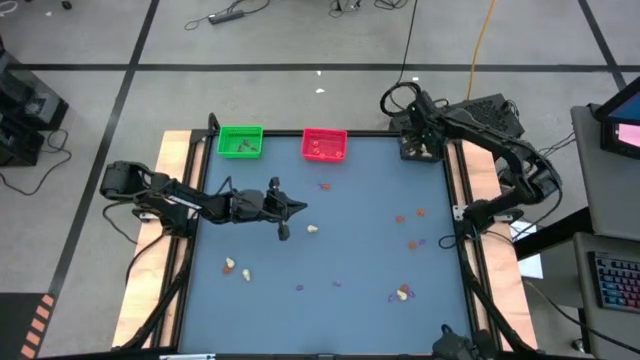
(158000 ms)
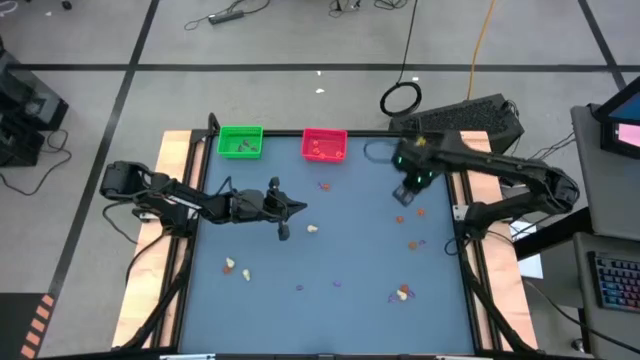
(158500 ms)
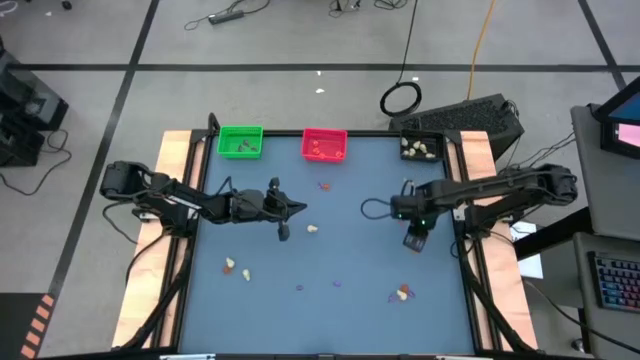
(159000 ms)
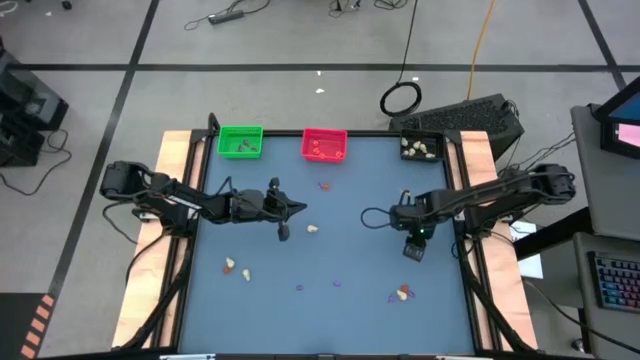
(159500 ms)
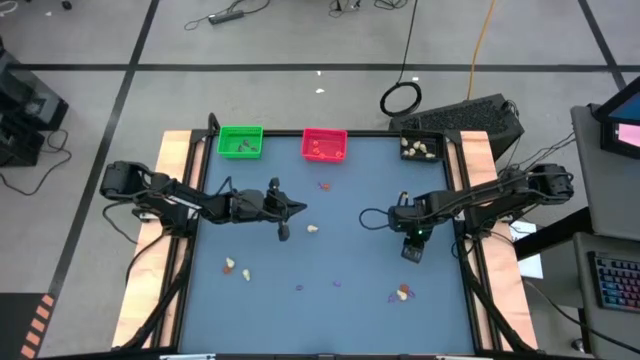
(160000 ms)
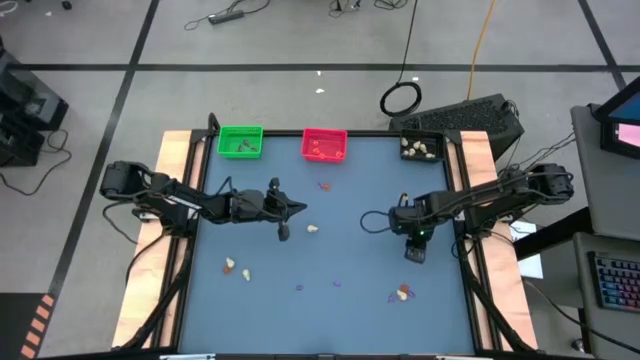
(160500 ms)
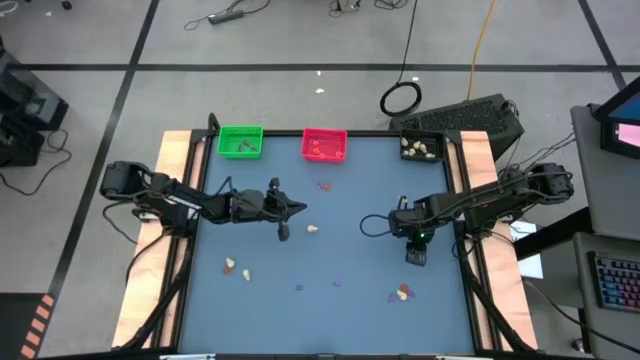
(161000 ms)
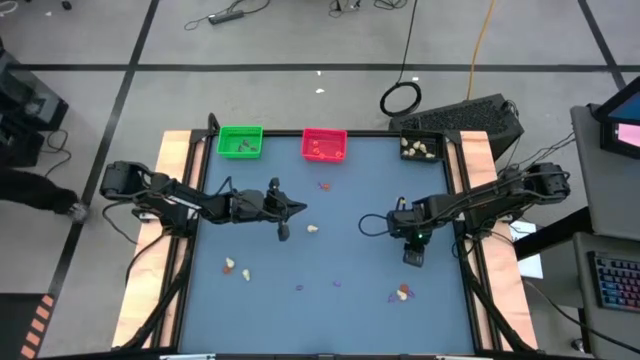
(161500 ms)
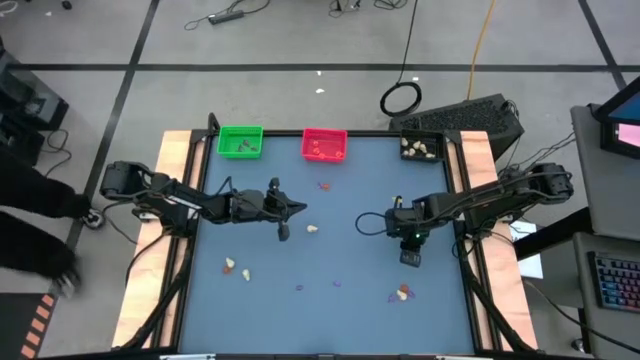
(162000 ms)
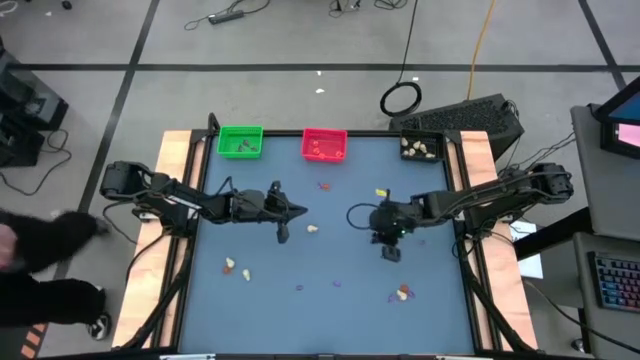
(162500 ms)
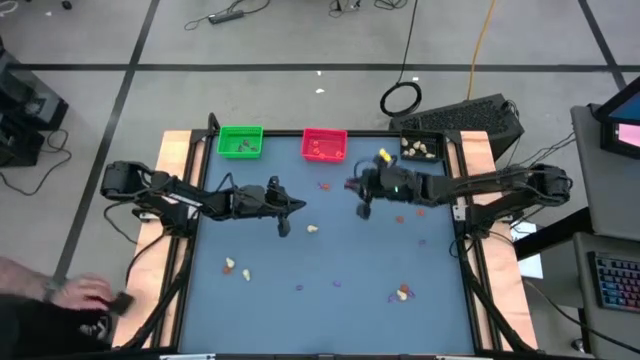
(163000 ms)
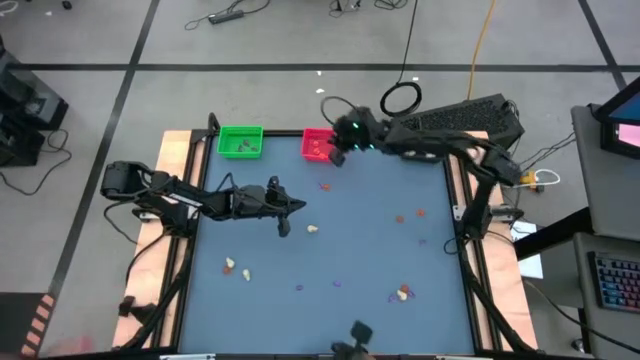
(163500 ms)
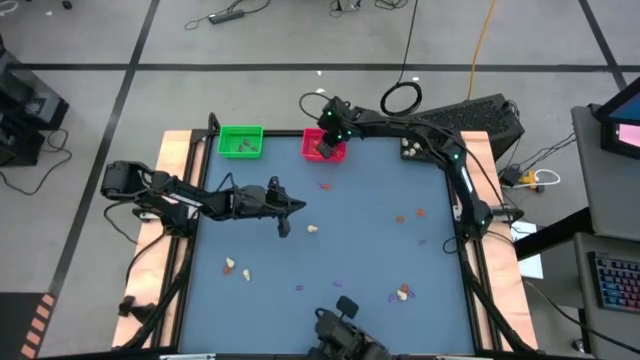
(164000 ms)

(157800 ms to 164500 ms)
Task: Sort Halloween decoration
Put the orange pumpkin toy into the red bin

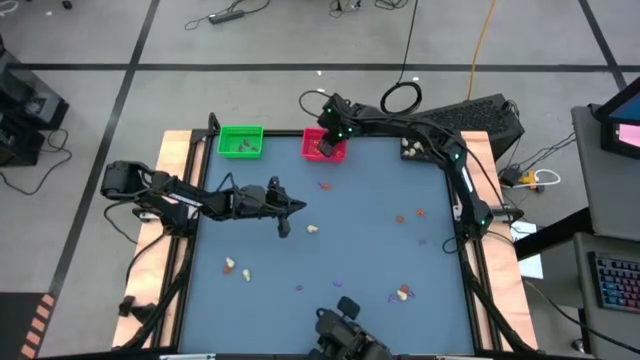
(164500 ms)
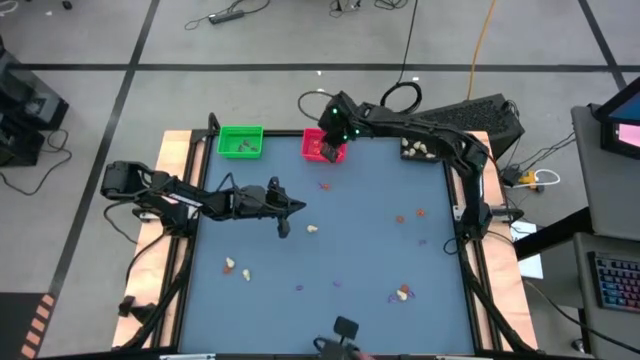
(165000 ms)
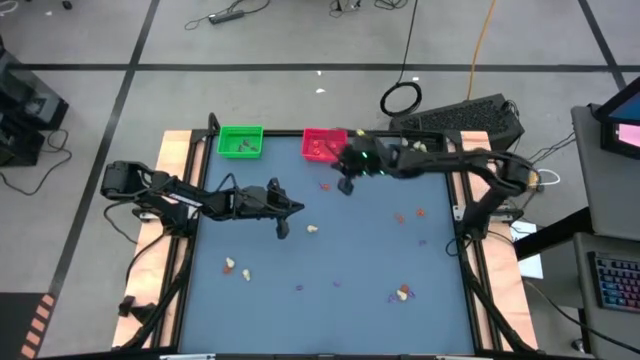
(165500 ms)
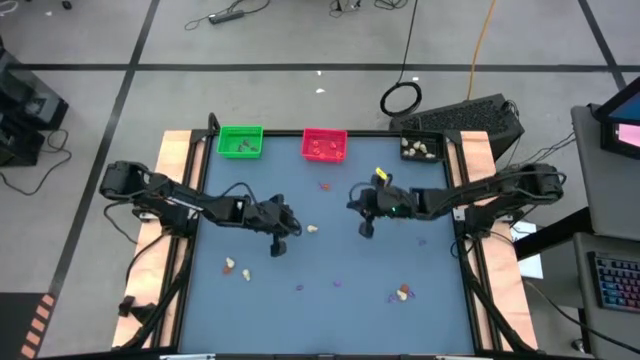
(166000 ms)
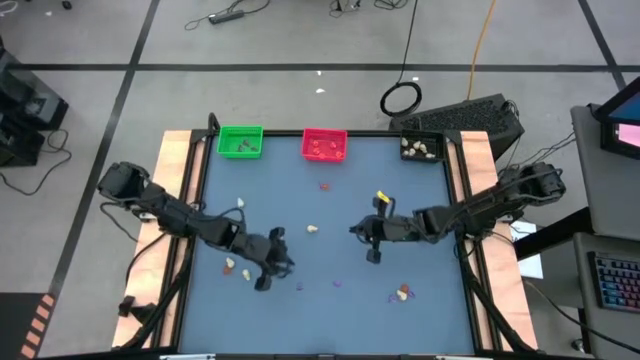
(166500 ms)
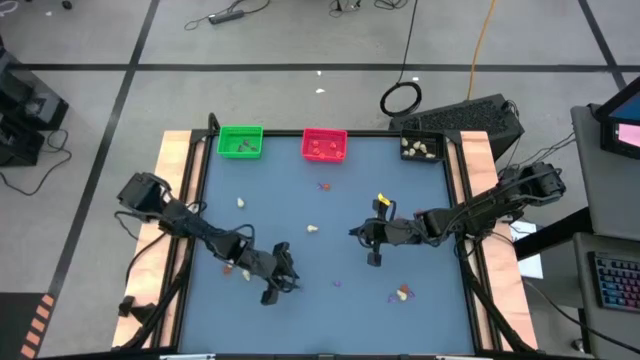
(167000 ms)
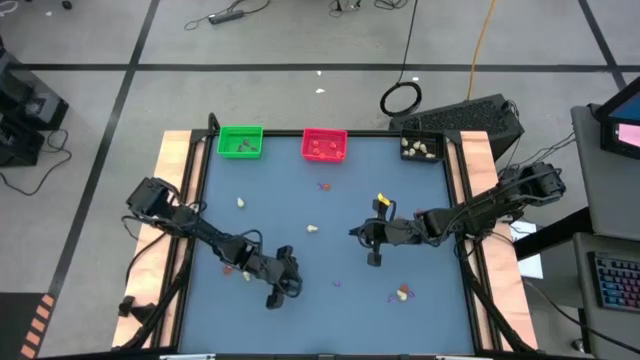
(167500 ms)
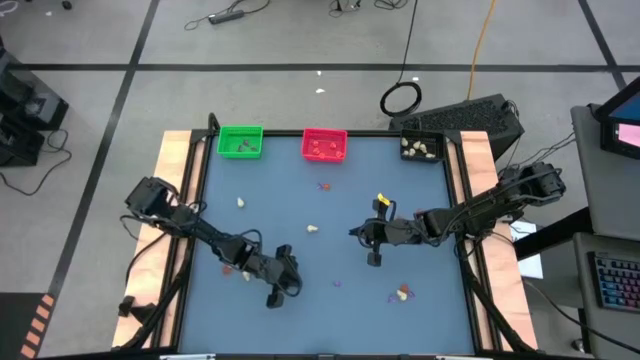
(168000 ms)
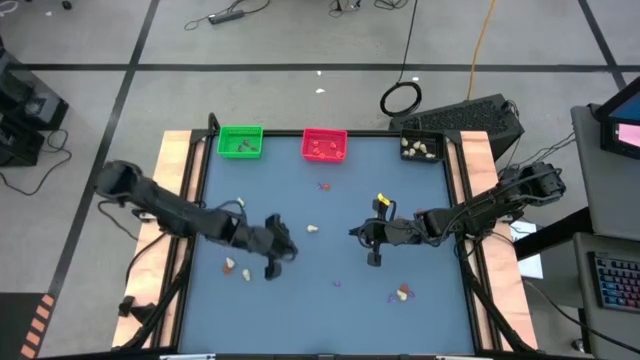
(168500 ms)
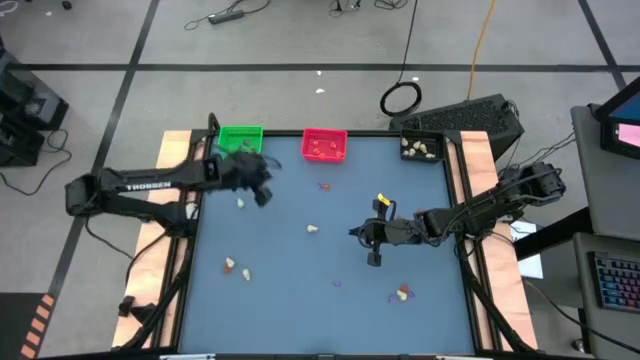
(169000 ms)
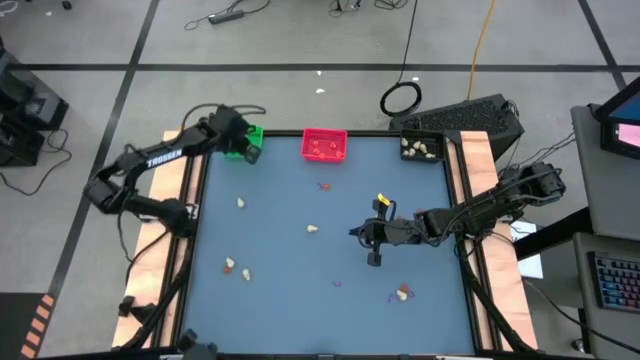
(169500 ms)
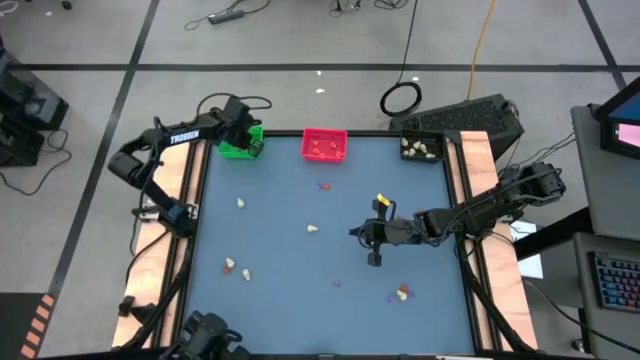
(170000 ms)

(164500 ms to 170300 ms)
Put the purple witch hat toy into the green bin

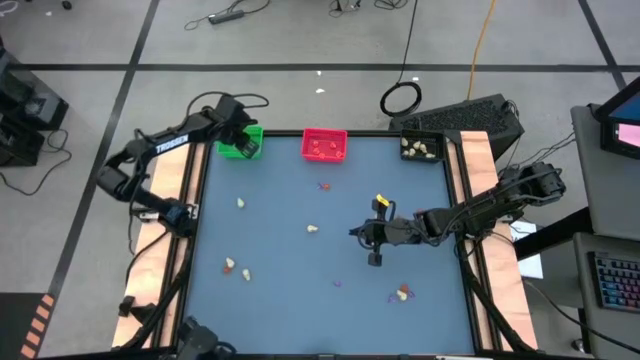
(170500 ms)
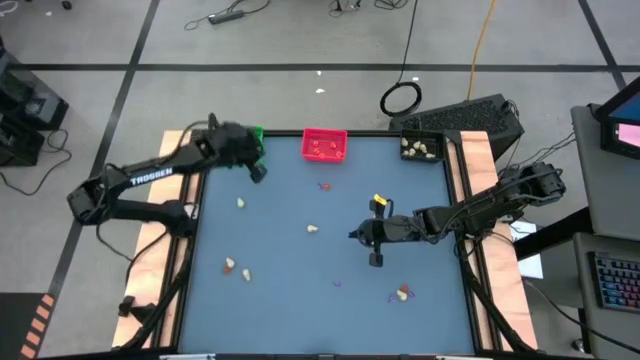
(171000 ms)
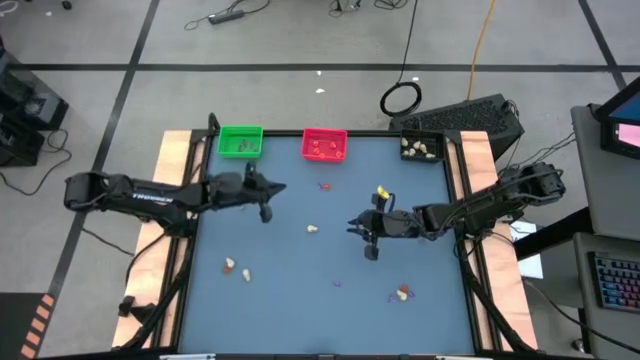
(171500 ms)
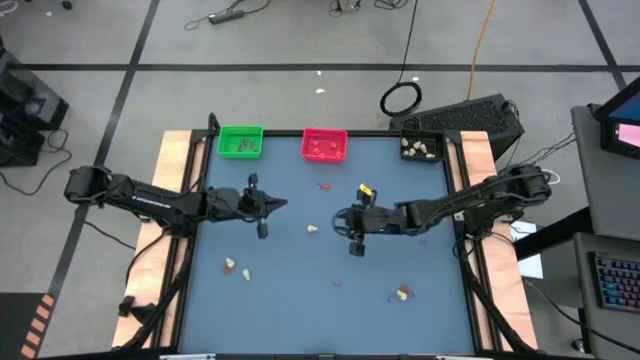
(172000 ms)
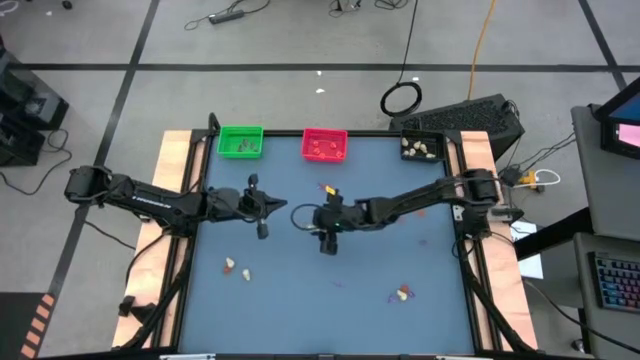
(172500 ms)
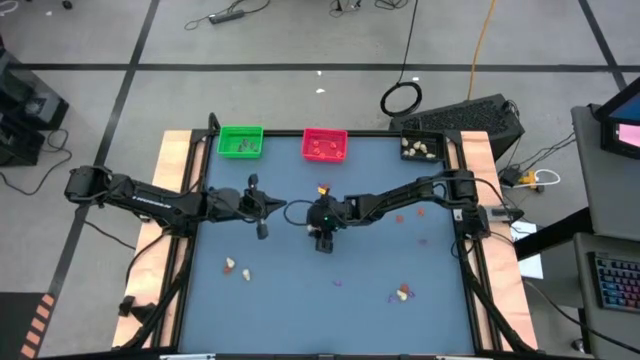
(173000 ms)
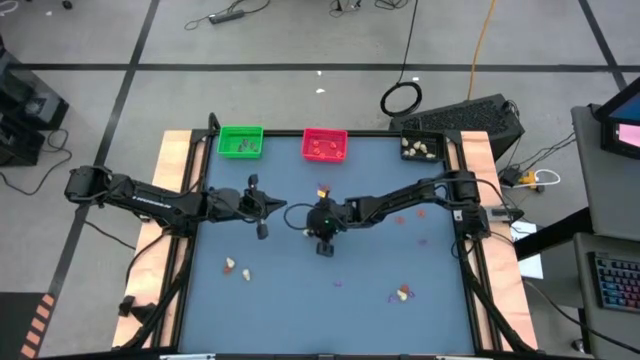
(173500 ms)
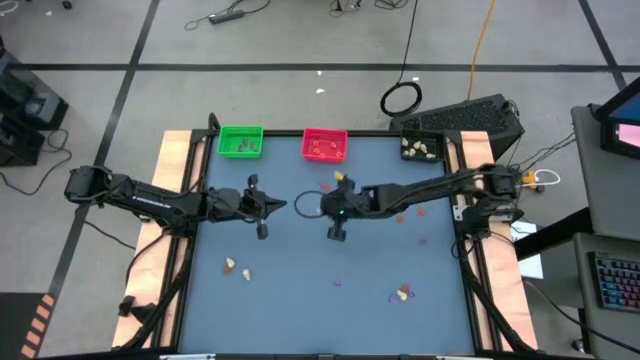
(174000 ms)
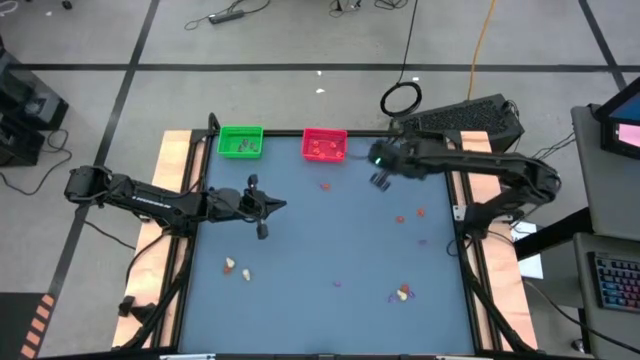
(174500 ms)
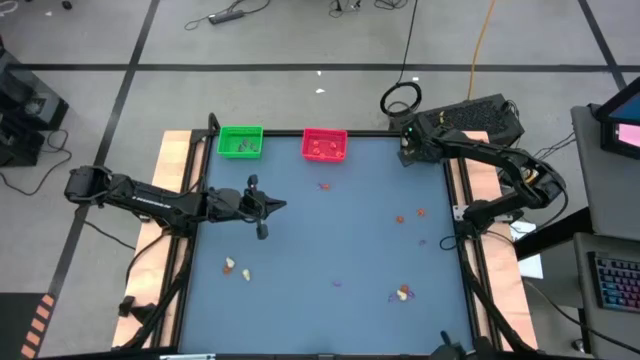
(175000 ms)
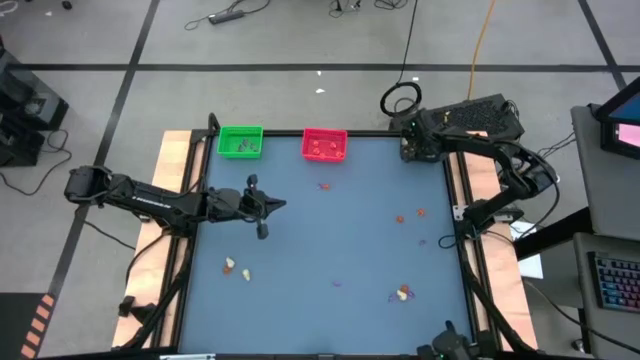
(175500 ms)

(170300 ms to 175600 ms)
Put the white skull toy into the black bin

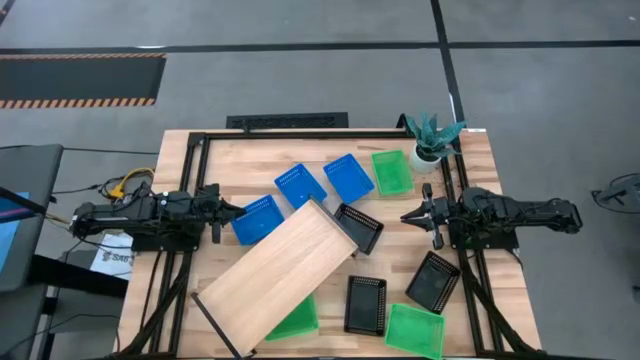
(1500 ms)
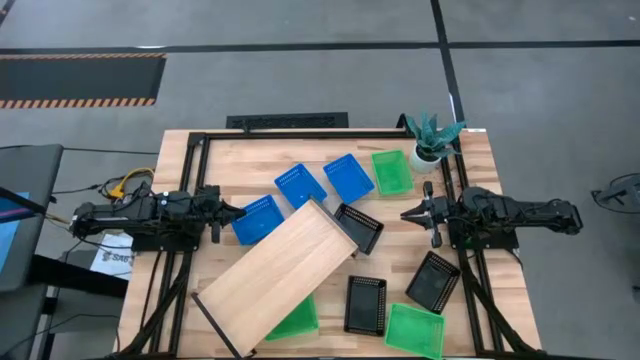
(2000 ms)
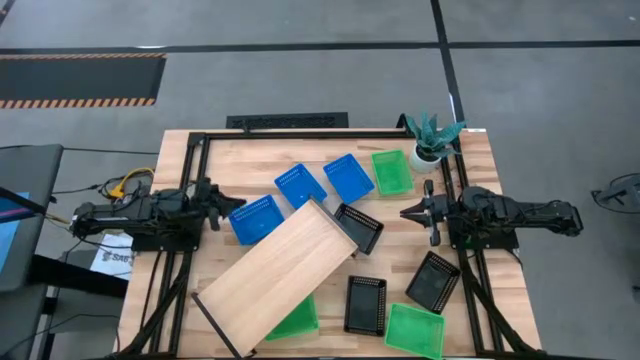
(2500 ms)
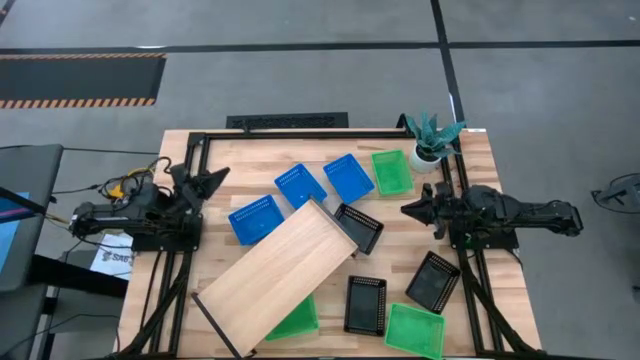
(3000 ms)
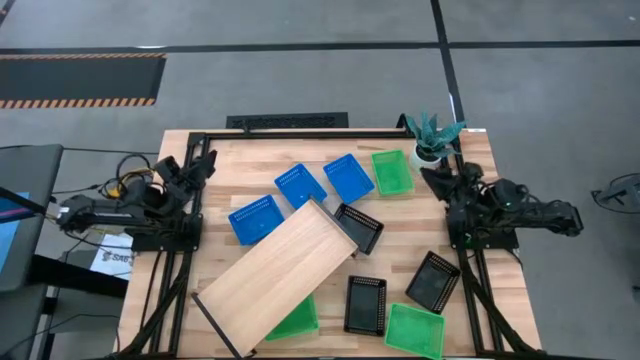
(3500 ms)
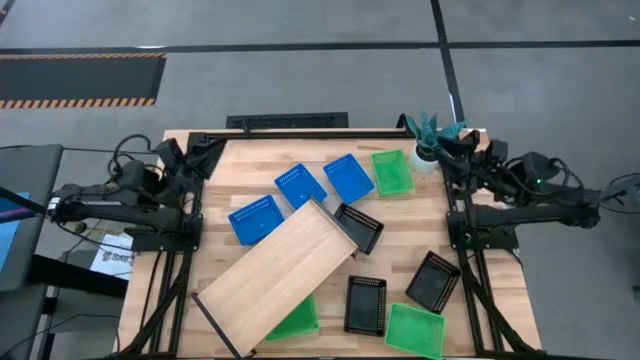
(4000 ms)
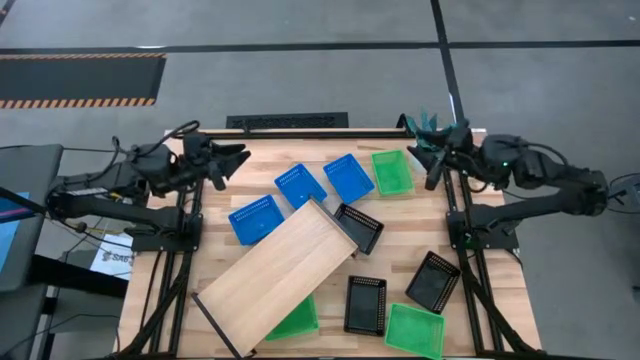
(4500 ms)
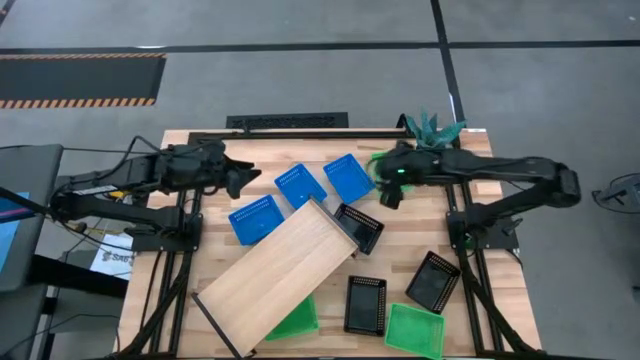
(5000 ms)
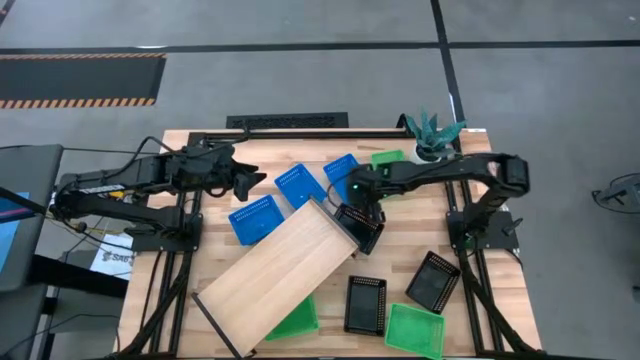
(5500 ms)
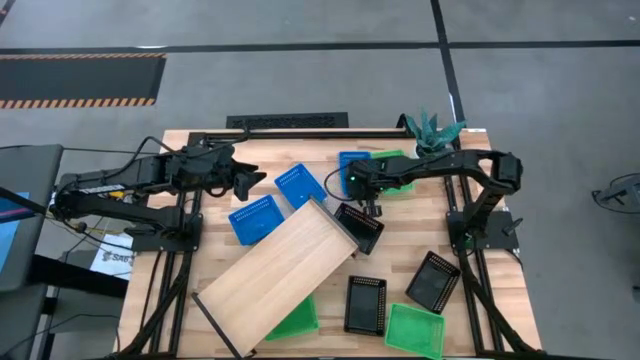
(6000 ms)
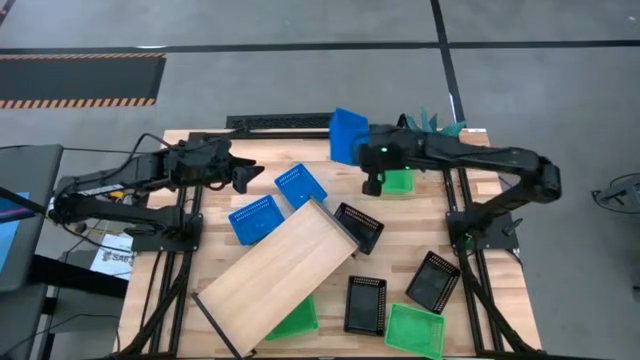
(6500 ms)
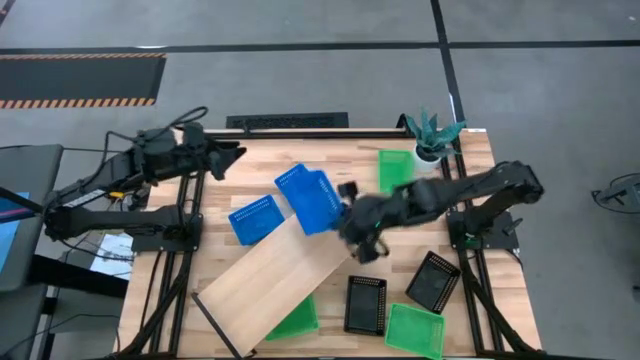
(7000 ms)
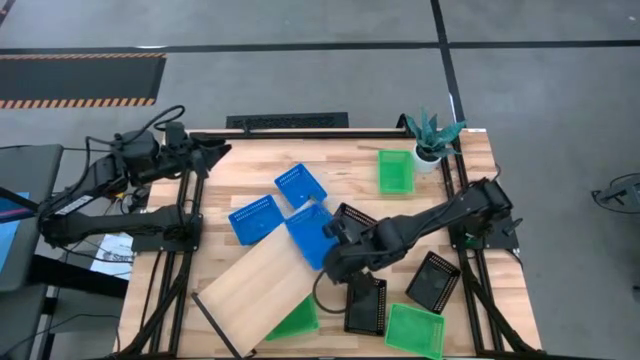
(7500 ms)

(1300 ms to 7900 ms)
Task: Stack baskets on shelf by color
Put the top right blue bin on the shelf
